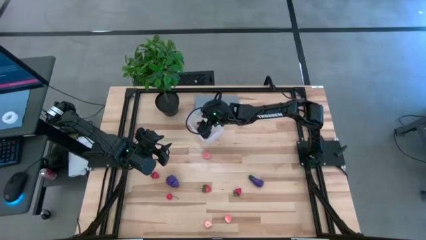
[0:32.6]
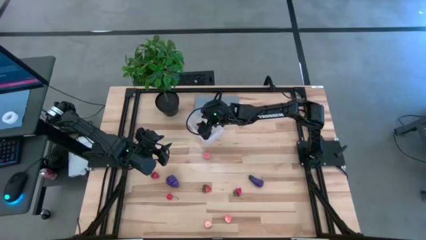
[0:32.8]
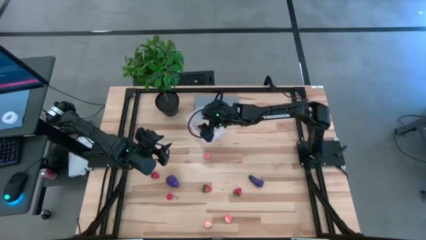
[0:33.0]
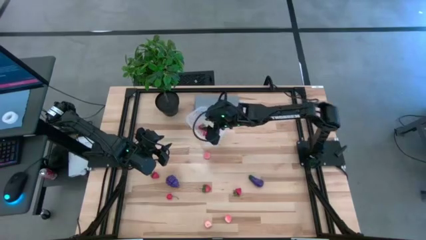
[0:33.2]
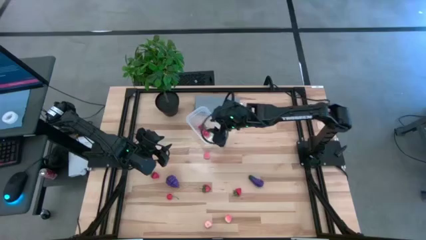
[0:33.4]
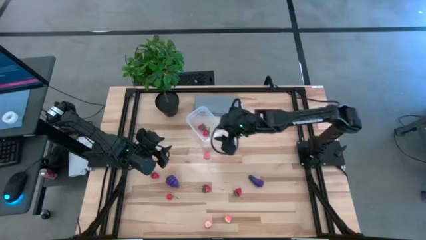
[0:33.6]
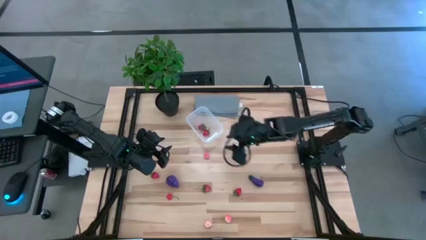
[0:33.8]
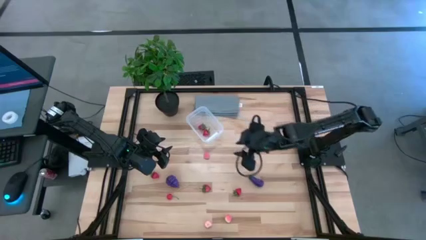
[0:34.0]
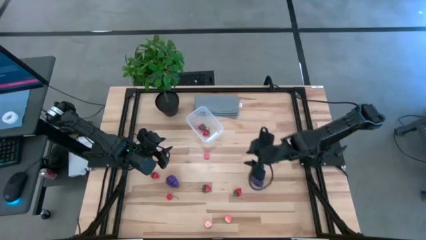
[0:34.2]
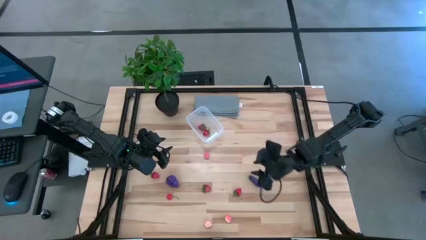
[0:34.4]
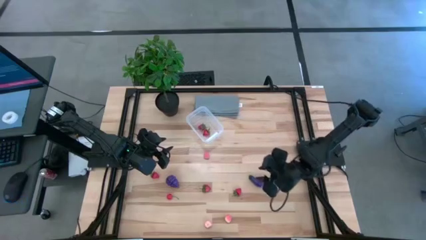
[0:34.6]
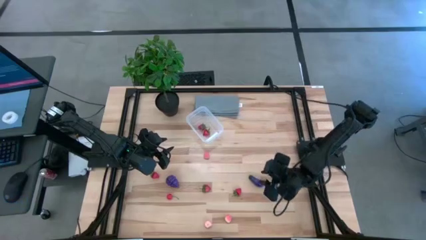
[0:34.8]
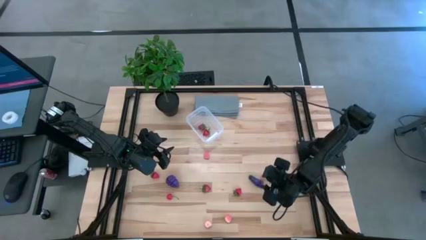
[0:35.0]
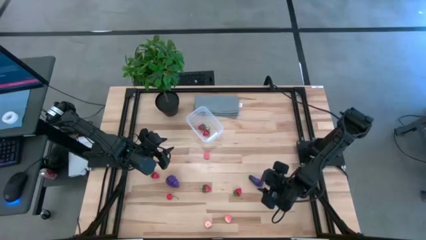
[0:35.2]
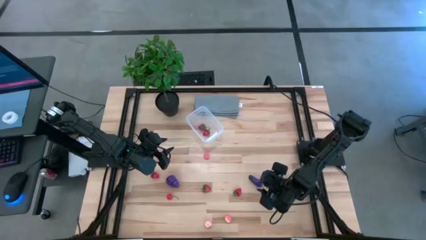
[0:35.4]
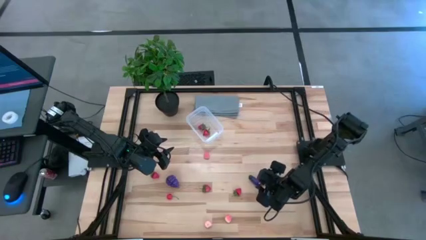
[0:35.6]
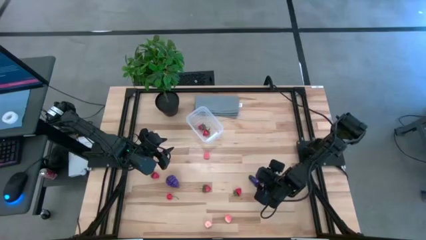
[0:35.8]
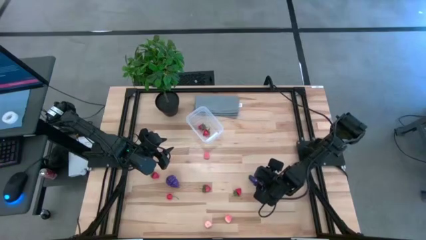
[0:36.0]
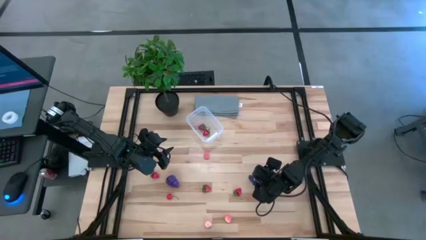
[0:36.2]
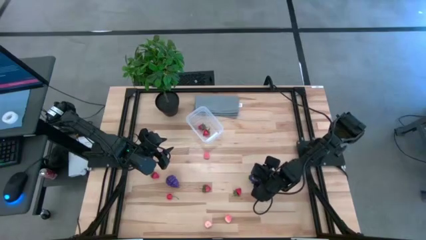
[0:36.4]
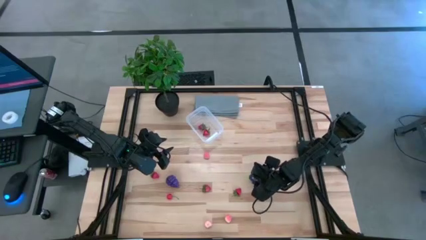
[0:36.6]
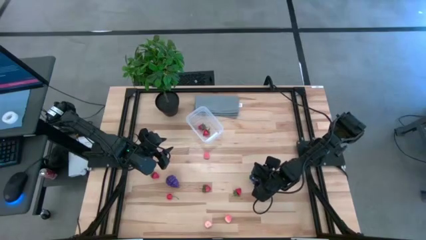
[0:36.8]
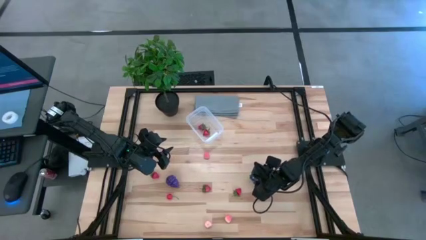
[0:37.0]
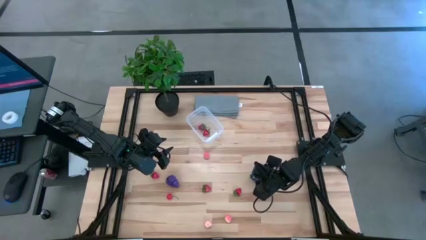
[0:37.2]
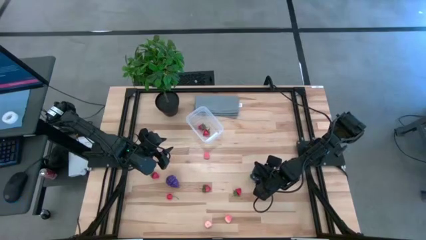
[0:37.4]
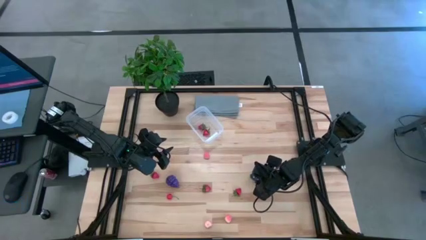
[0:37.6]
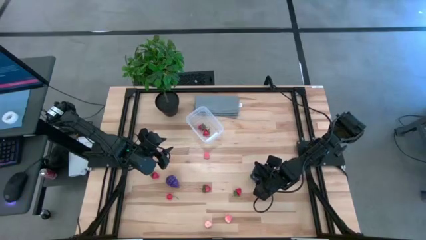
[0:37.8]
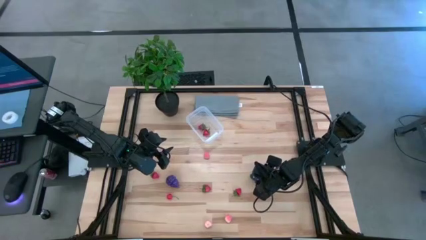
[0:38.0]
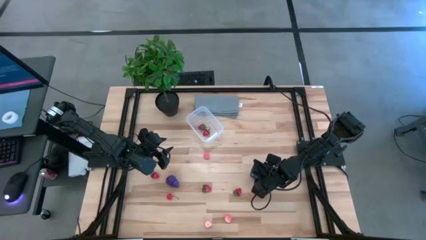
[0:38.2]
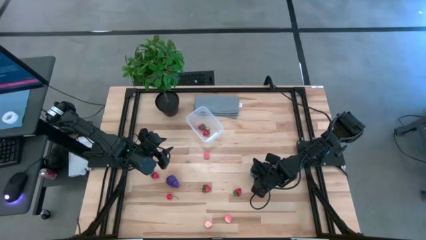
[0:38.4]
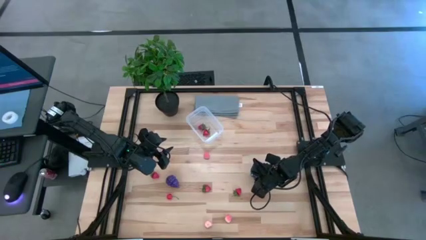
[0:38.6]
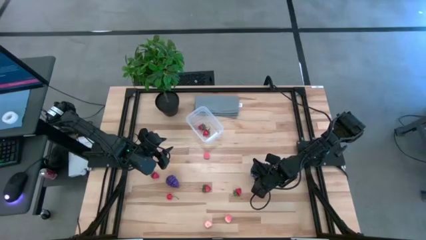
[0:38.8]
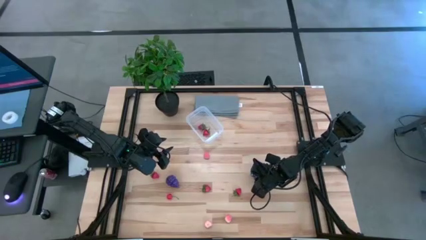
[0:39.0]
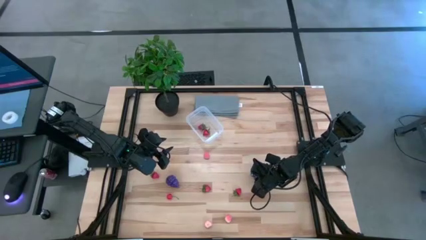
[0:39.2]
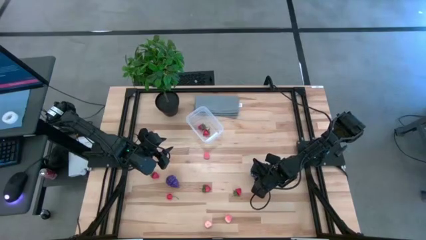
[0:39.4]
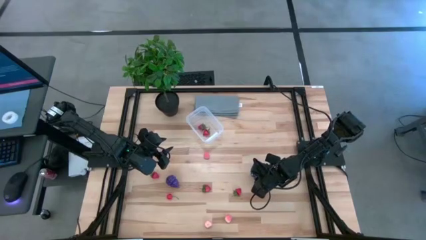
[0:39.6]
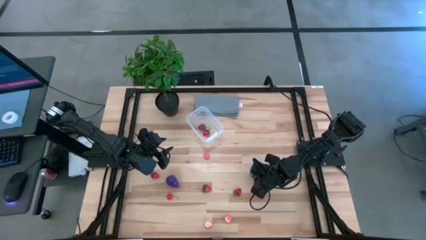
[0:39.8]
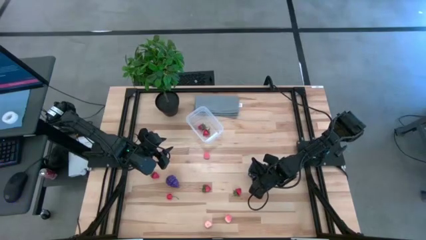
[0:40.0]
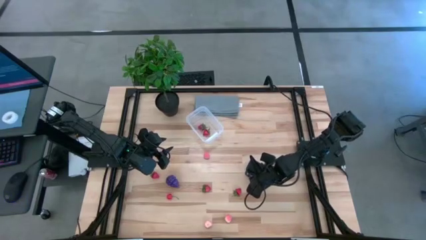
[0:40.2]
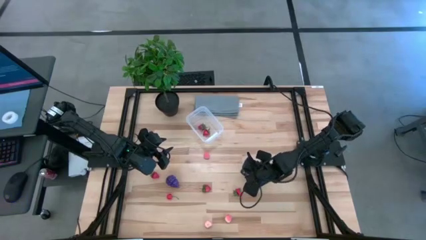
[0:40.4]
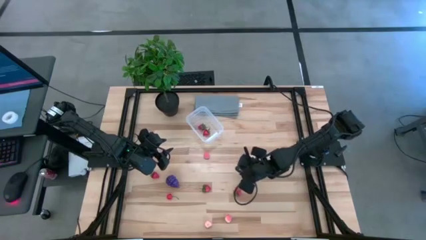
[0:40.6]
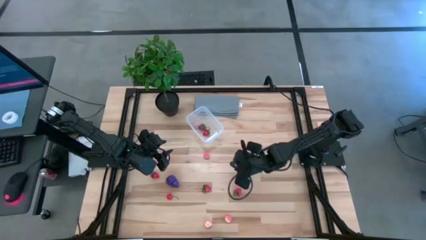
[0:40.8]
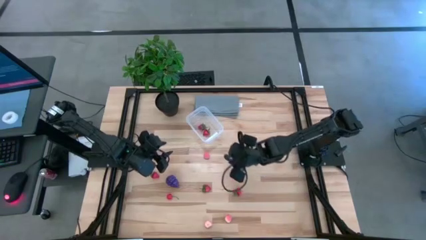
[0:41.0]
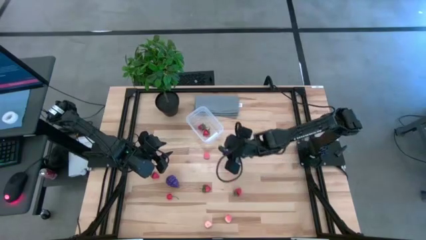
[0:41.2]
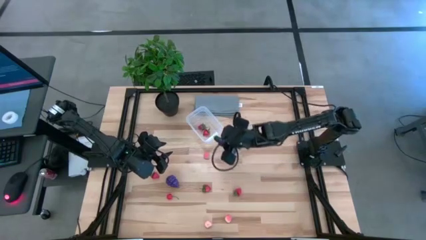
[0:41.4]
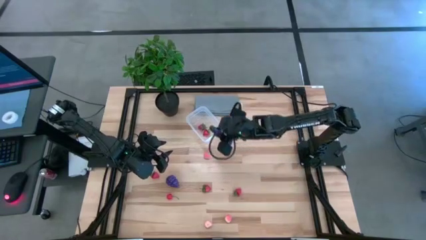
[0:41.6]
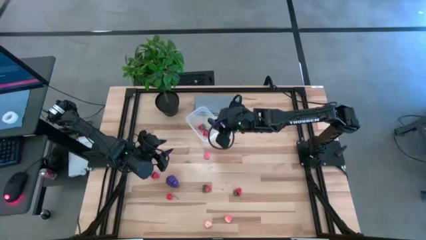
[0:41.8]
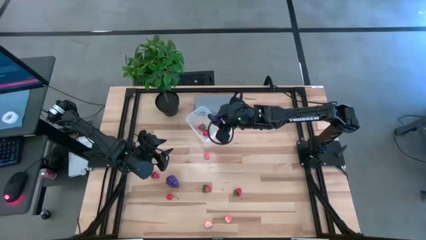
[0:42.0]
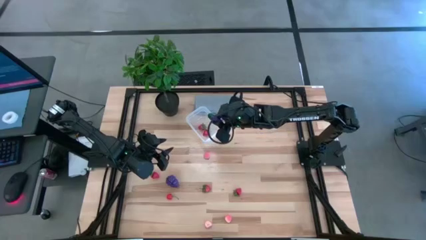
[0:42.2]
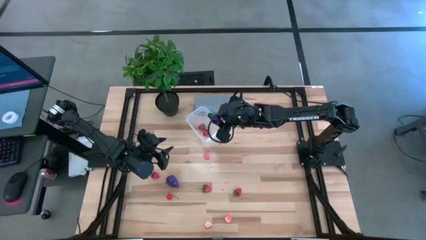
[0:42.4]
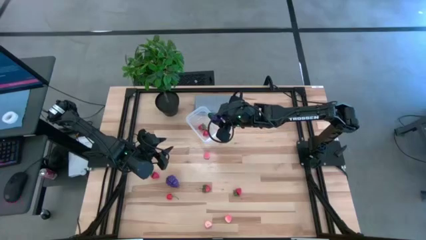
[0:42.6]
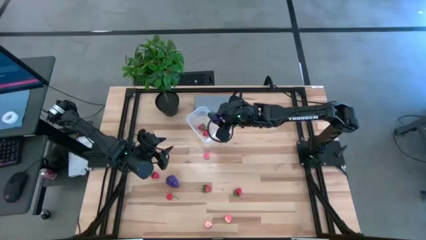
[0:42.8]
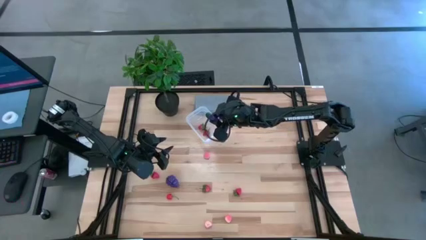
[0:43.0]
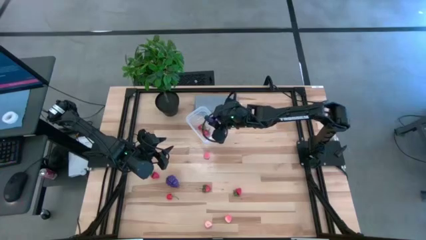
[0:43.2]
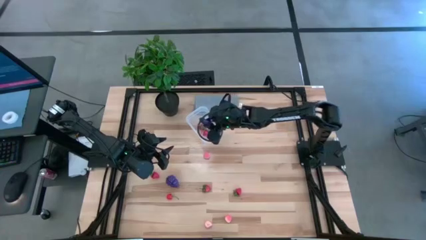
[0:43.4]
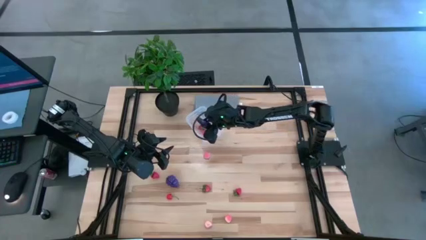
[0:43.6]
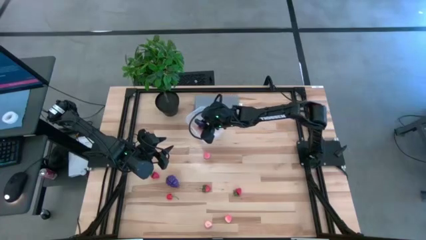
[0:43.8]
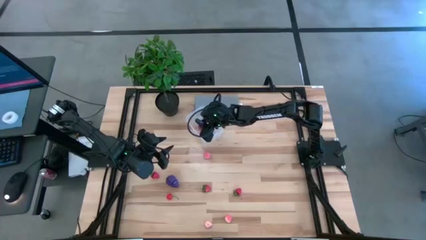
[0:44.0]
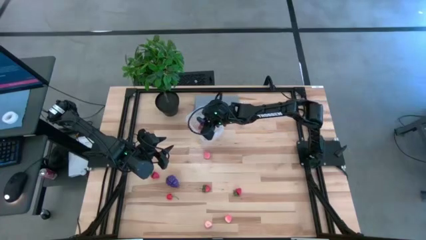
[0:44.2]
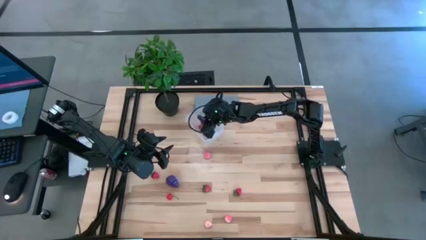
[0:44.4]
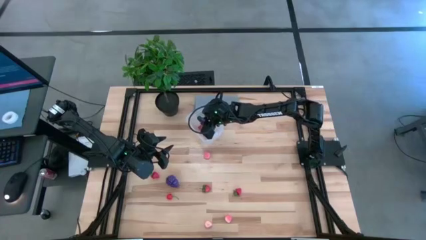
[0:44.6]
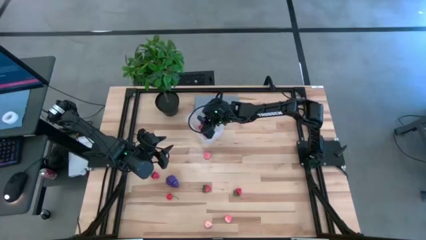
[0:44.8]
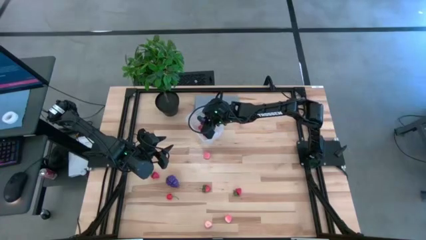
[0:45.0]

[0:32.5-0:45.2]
Task: Pick and placing Produce into tupperware
Put the violet eggplant into the transparent bin
